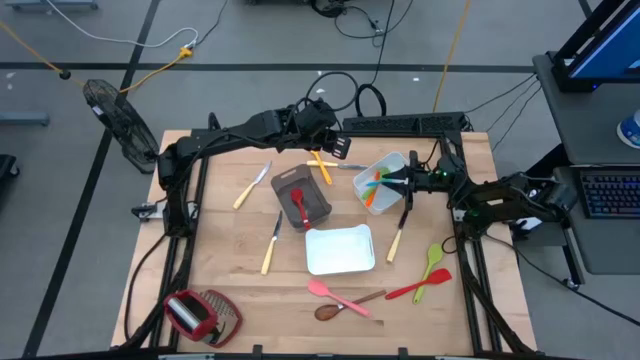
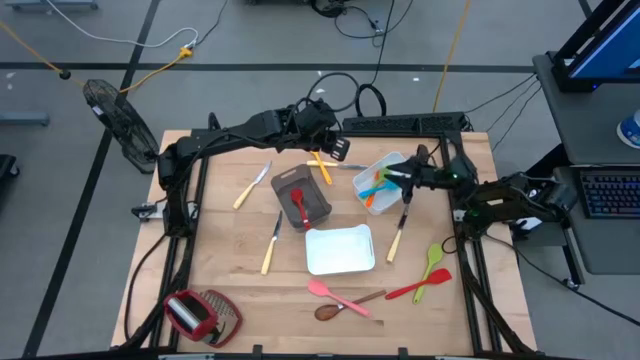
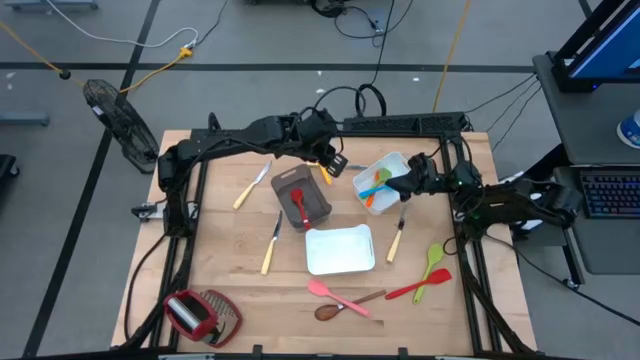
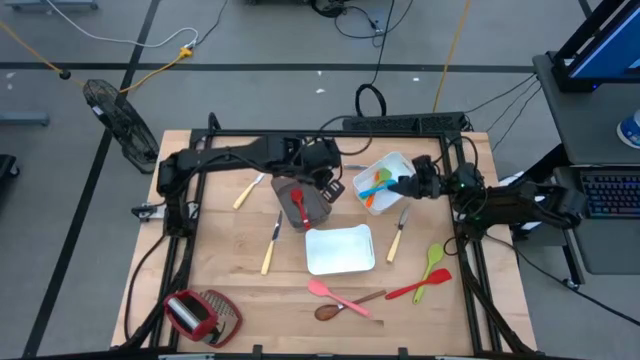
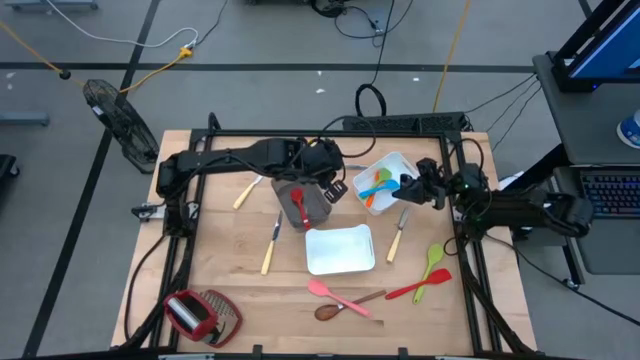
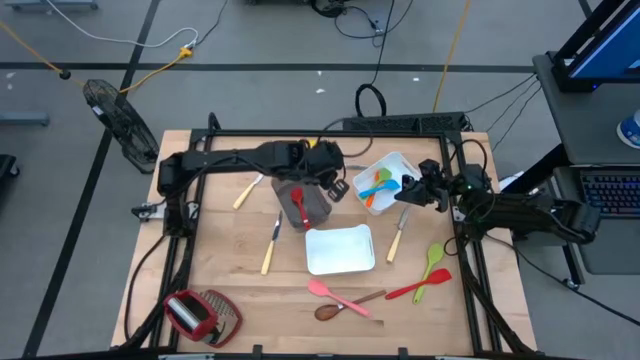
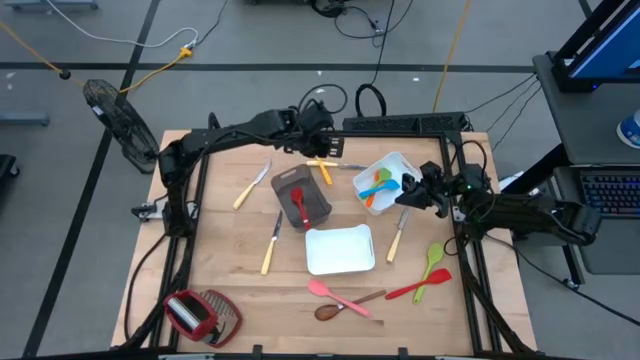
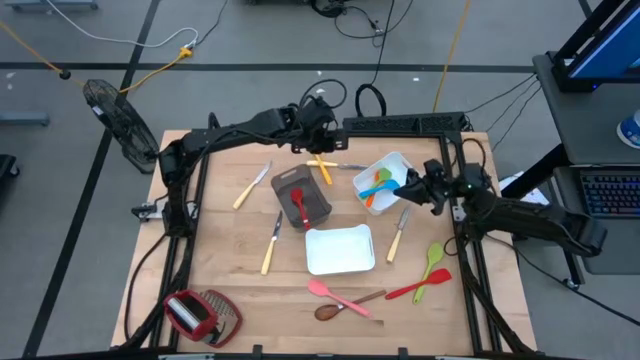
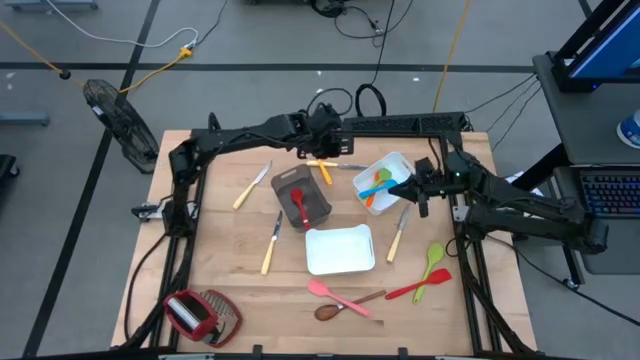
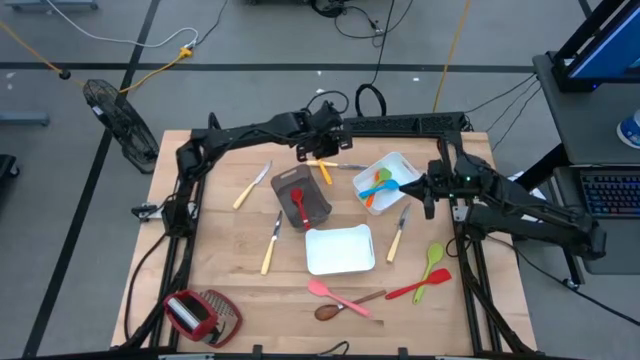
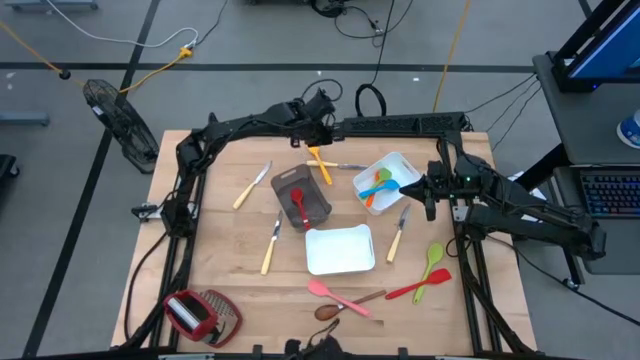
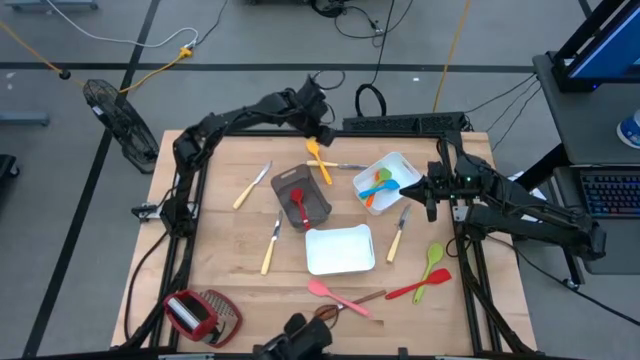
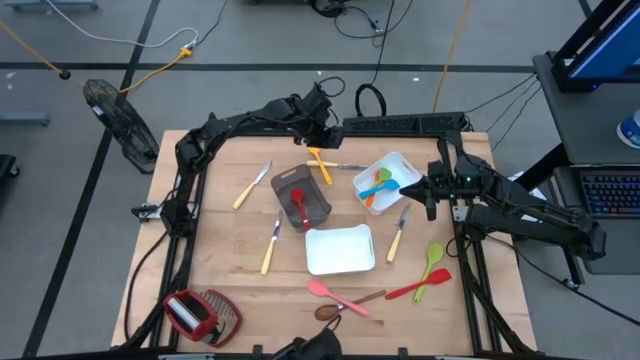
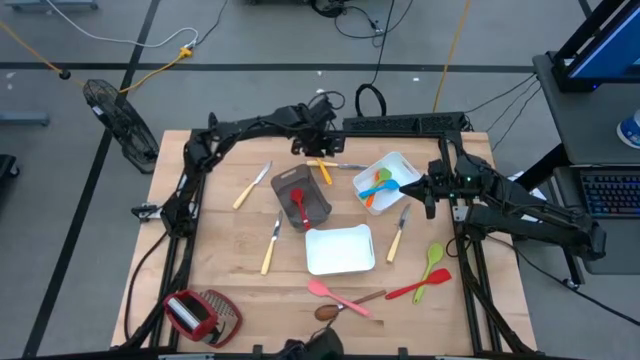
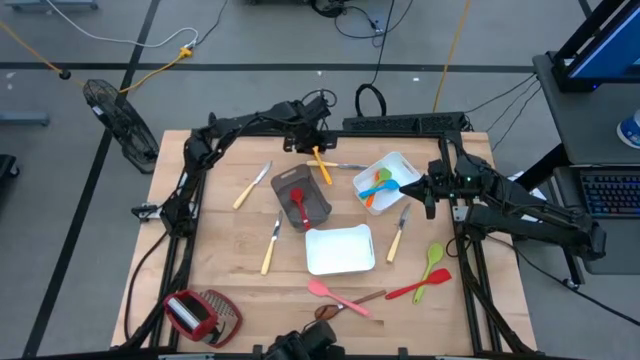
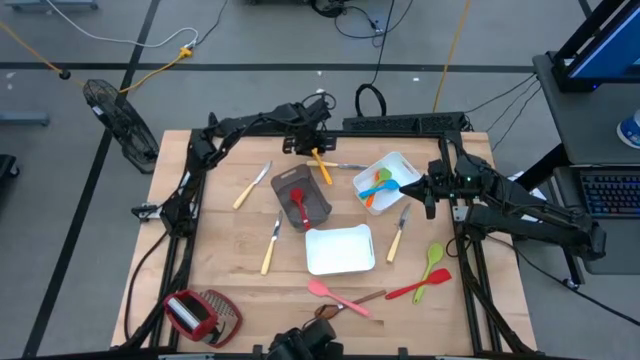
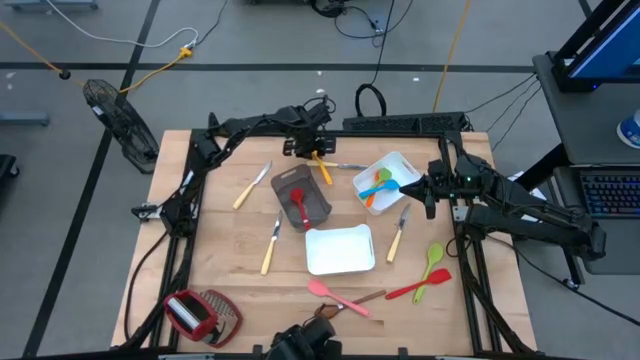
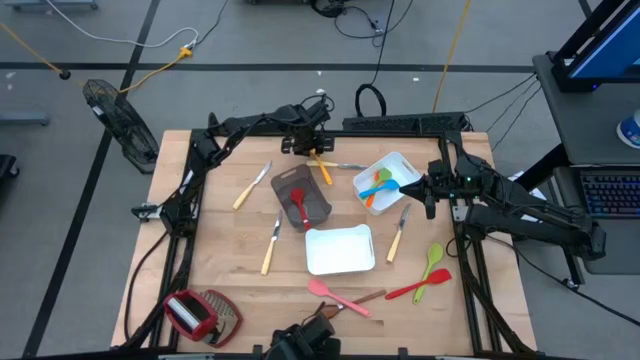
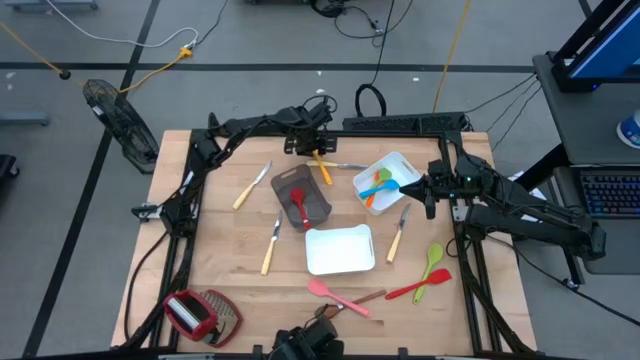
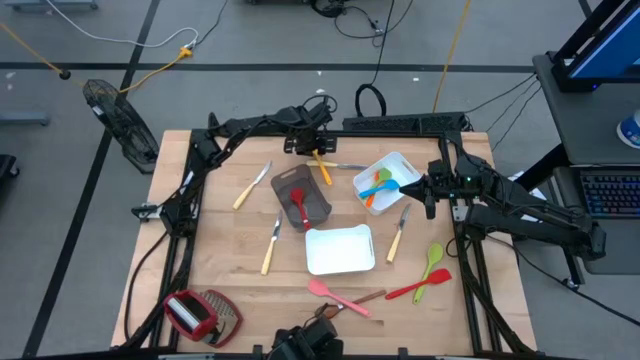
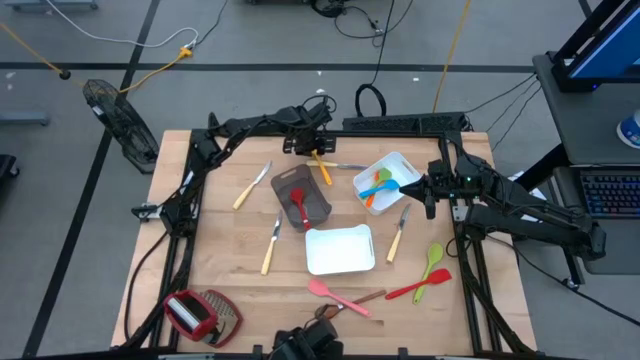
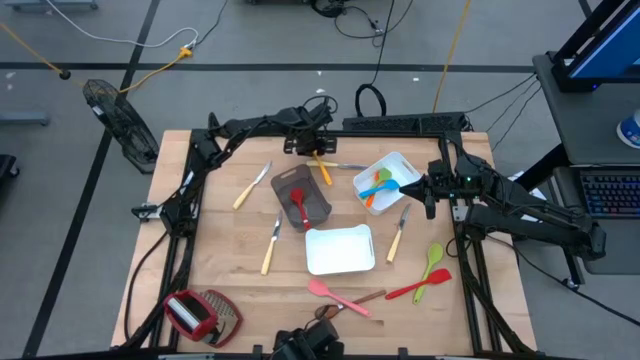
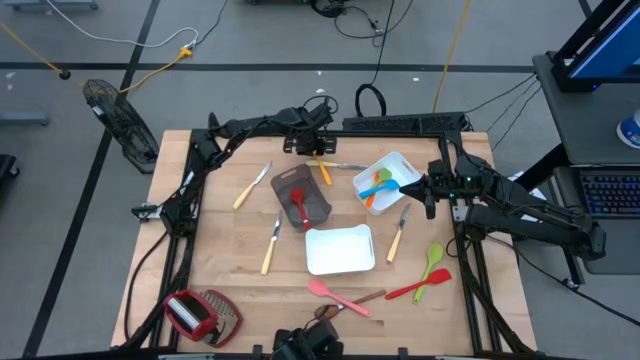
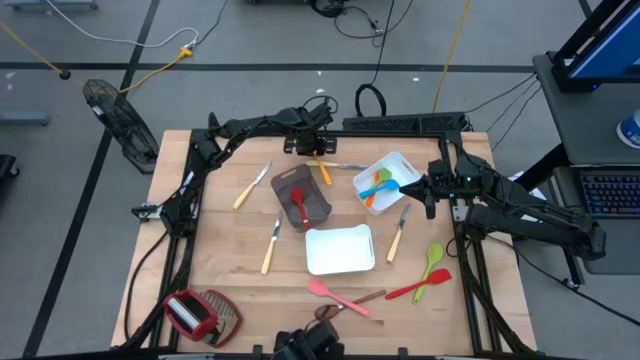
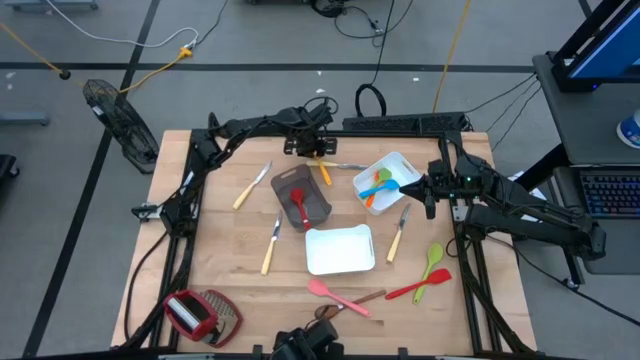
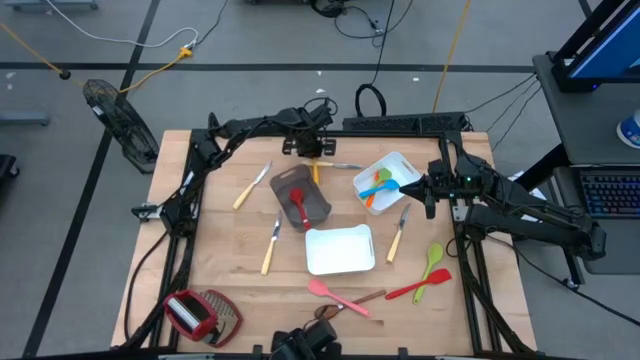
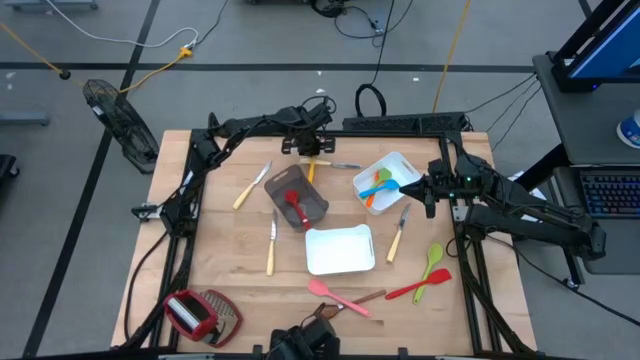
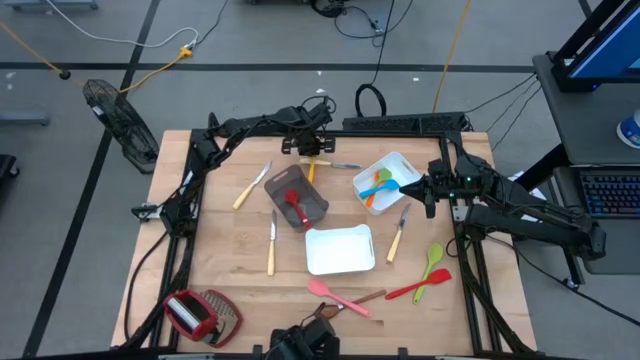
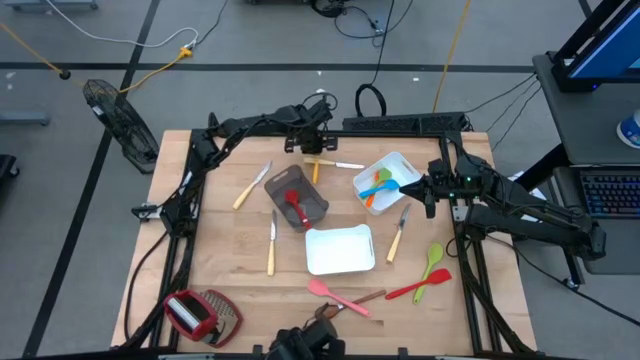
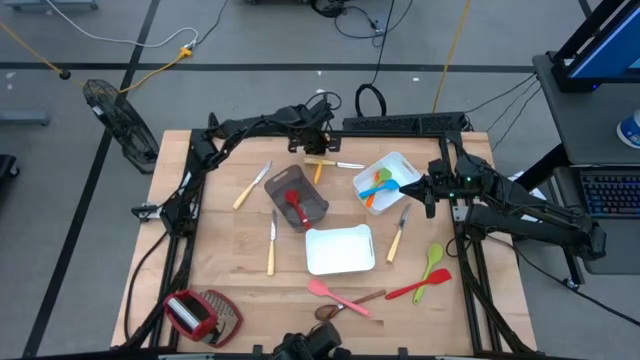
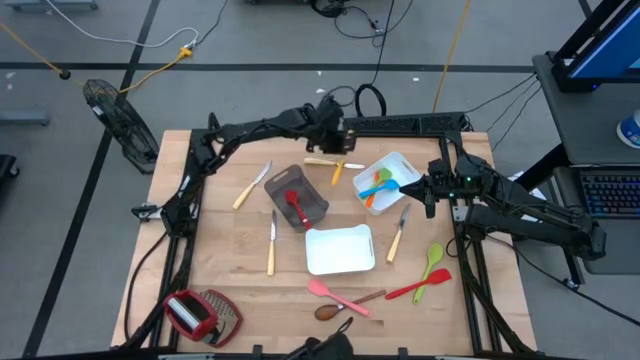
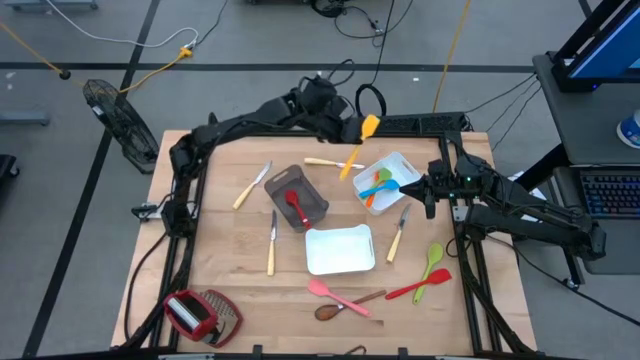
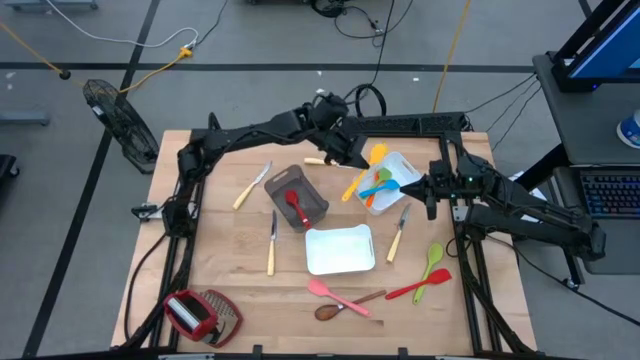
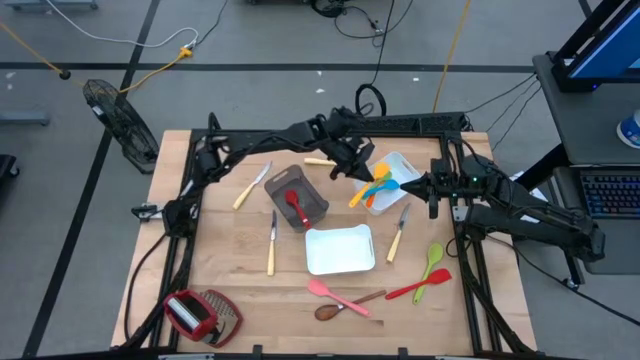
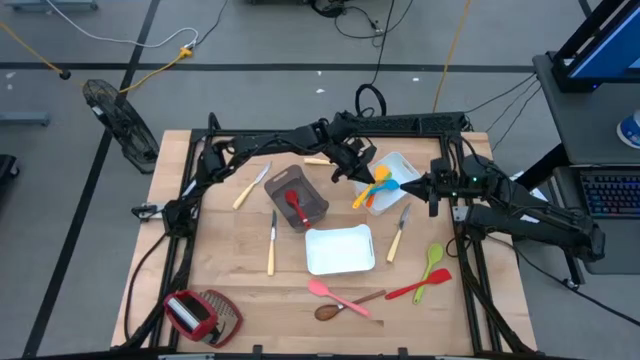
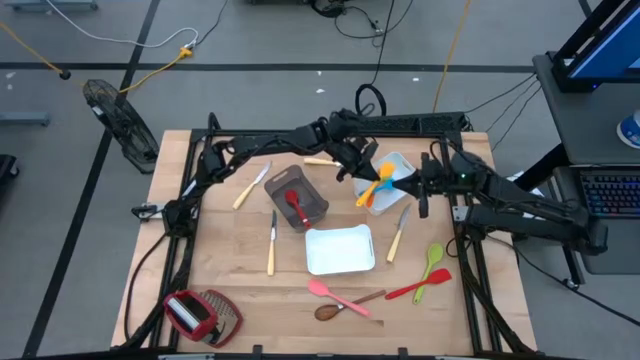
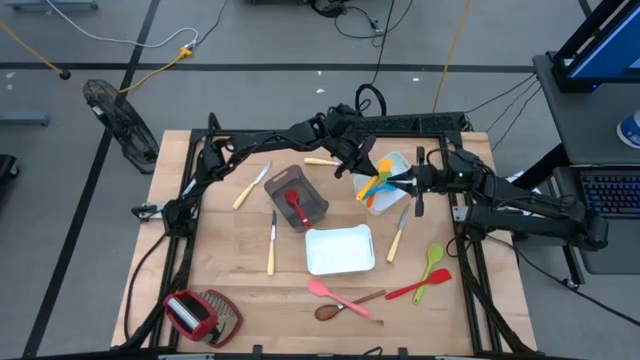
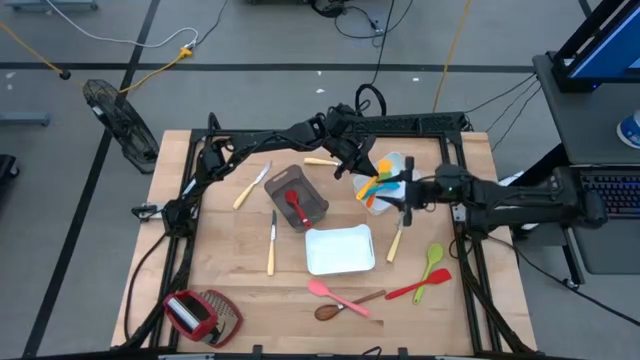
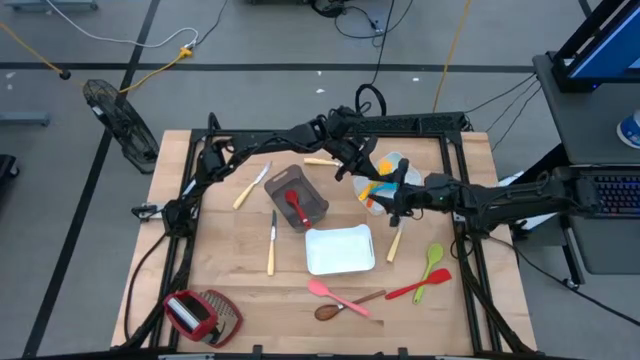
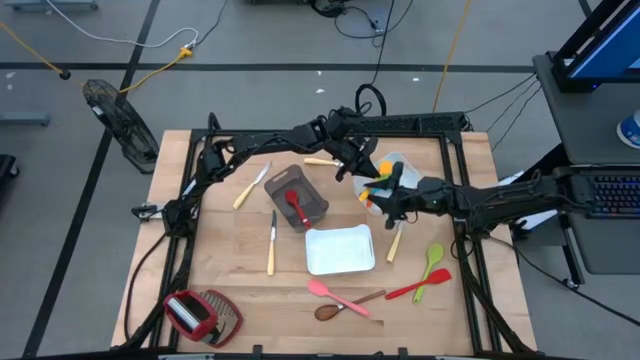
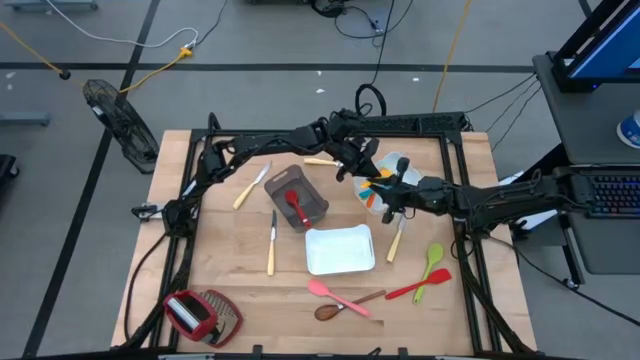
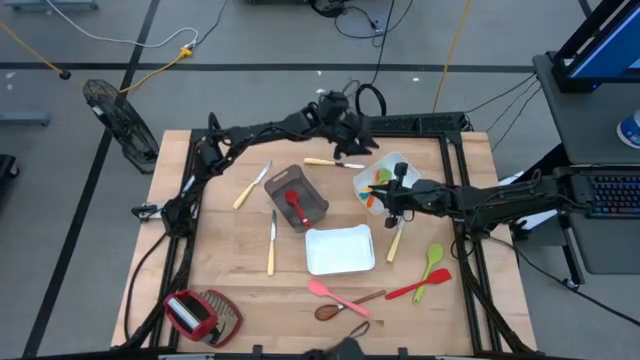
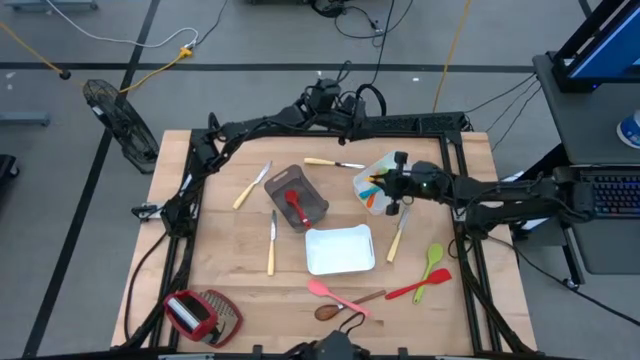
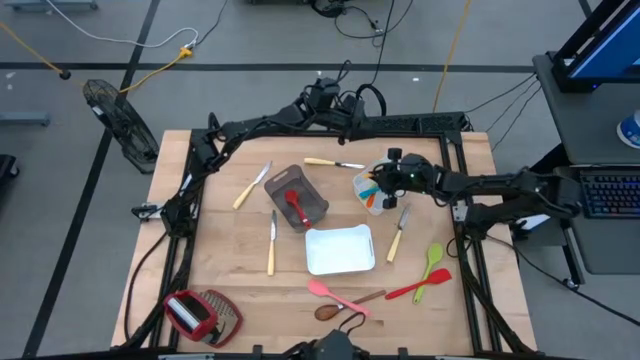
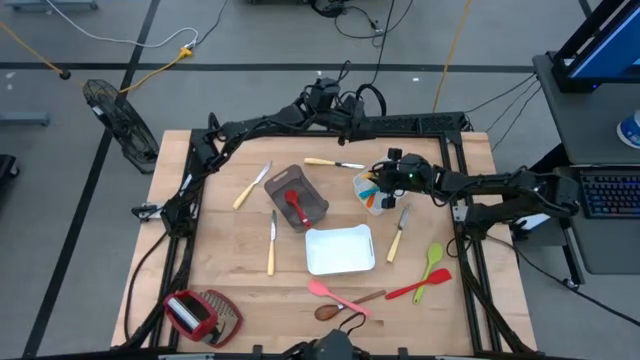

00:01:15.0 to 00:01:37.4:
Task: Pick & Place Kitchen Items
Put the yellow spatula into the top white bin
